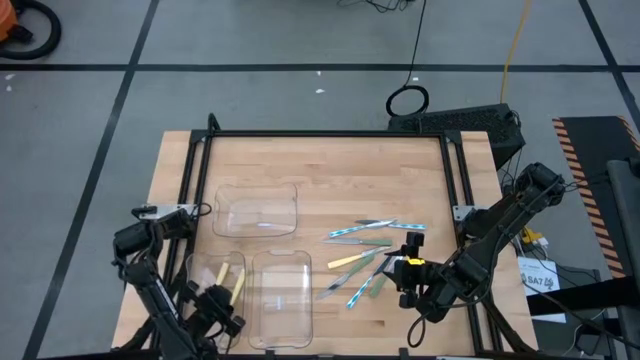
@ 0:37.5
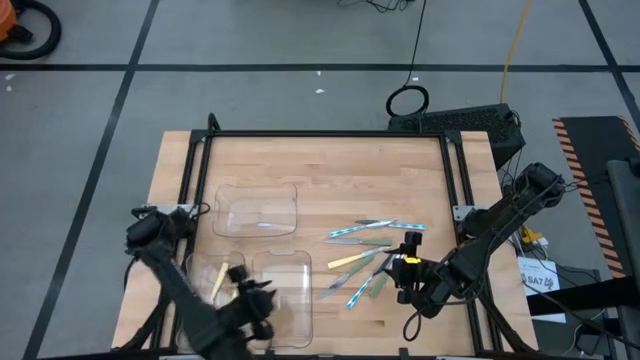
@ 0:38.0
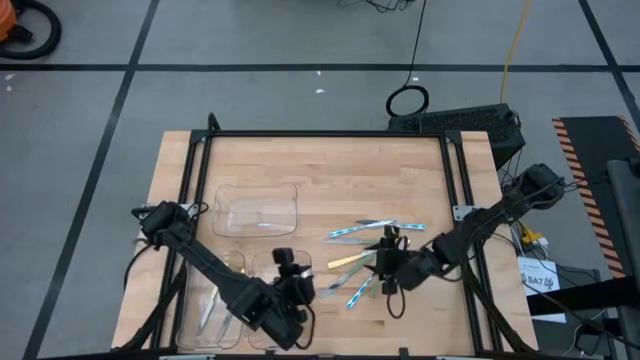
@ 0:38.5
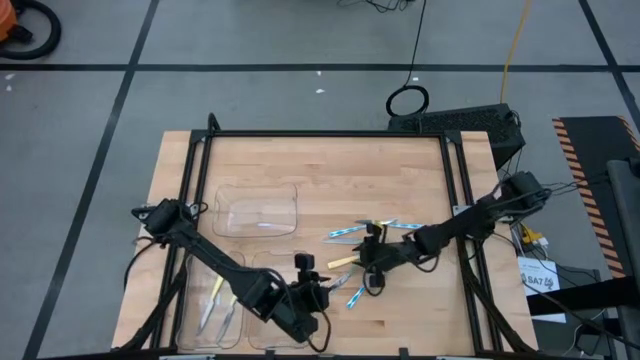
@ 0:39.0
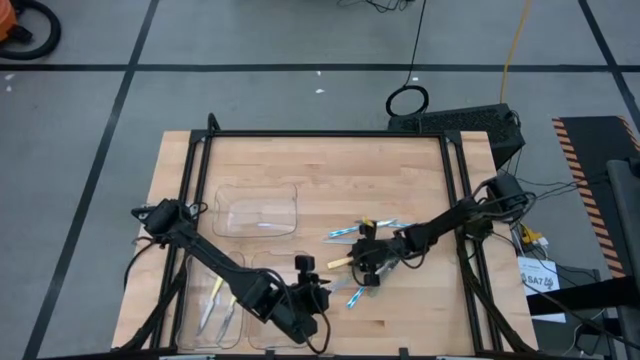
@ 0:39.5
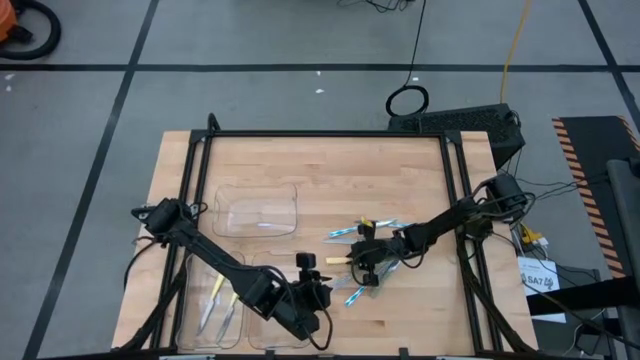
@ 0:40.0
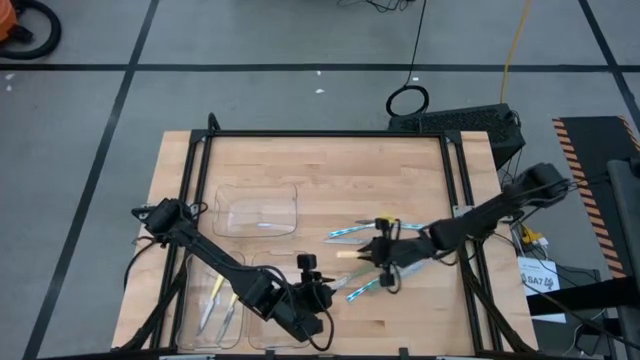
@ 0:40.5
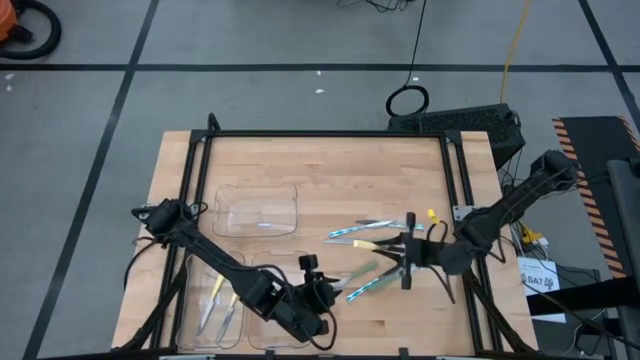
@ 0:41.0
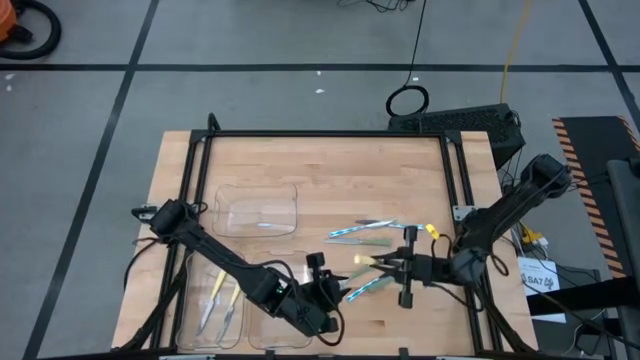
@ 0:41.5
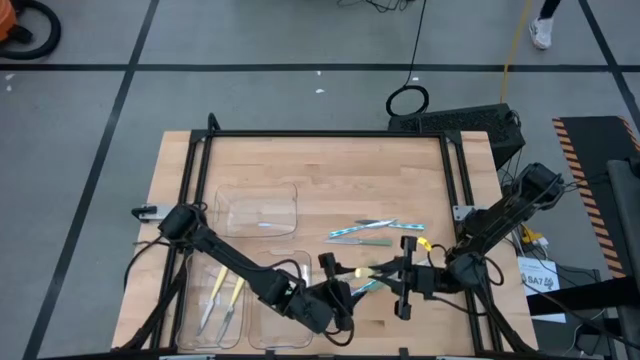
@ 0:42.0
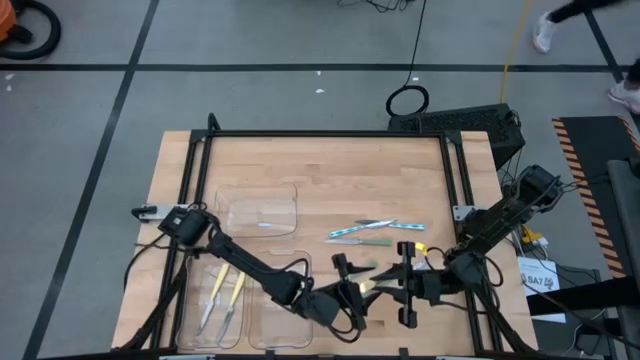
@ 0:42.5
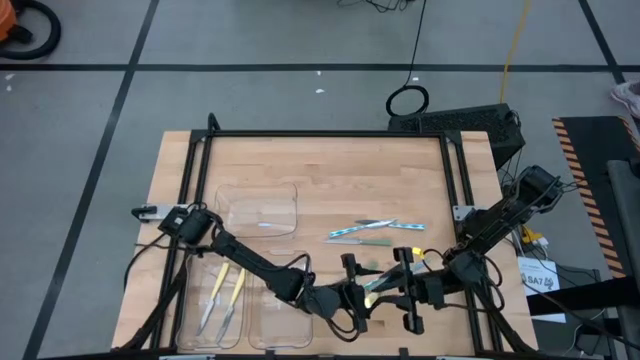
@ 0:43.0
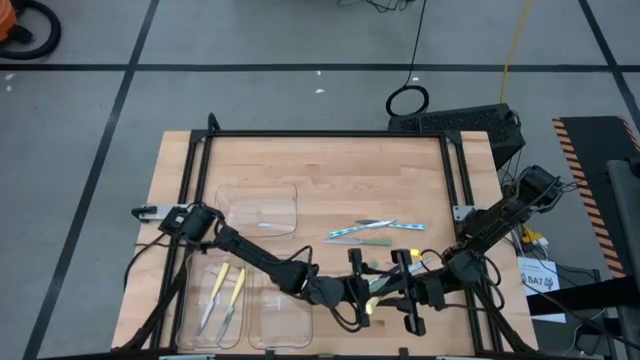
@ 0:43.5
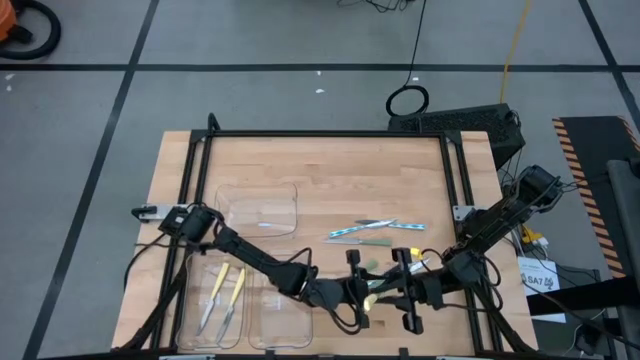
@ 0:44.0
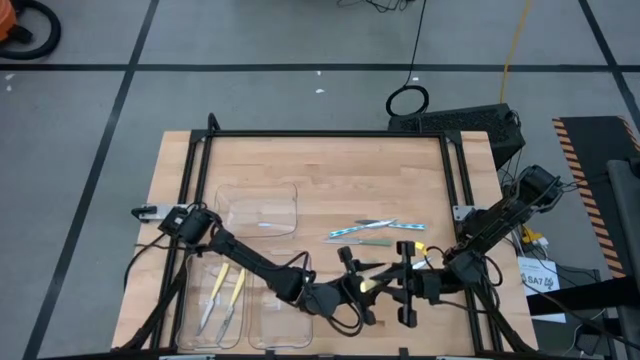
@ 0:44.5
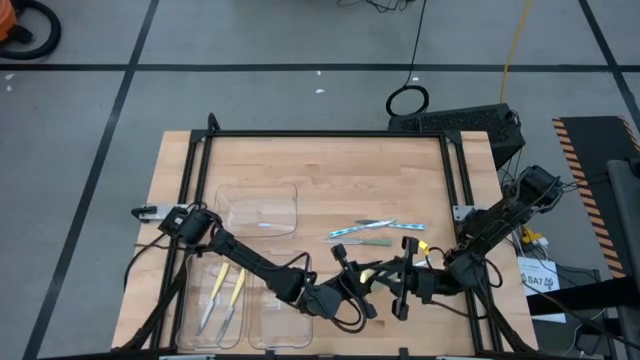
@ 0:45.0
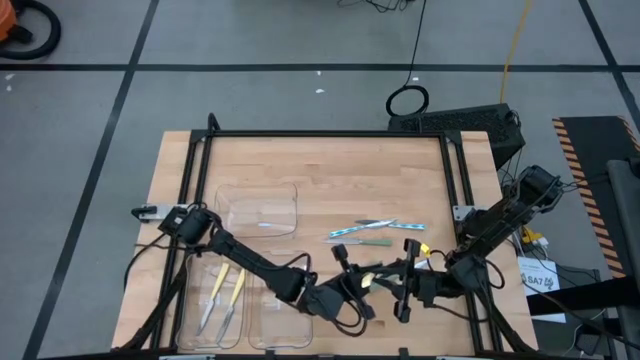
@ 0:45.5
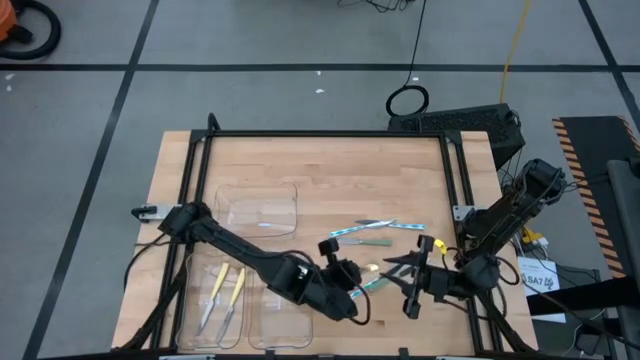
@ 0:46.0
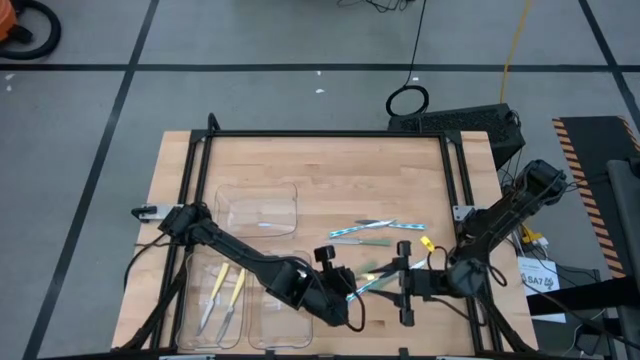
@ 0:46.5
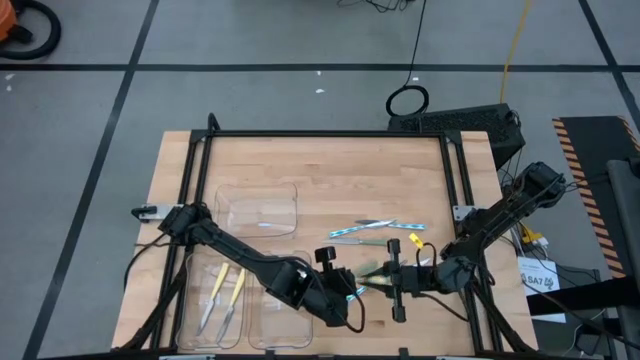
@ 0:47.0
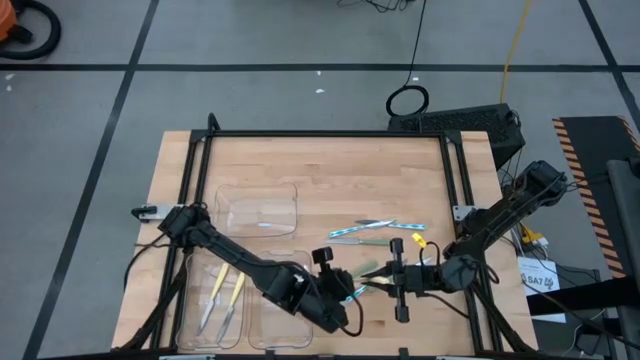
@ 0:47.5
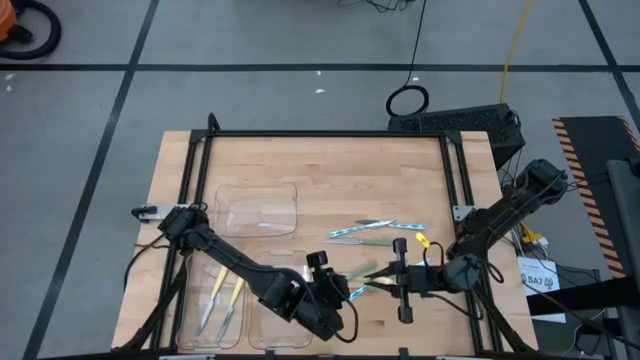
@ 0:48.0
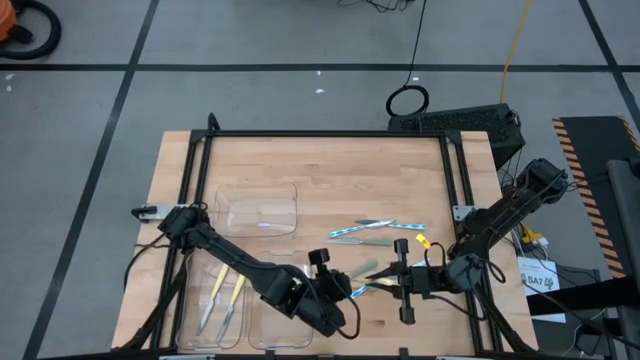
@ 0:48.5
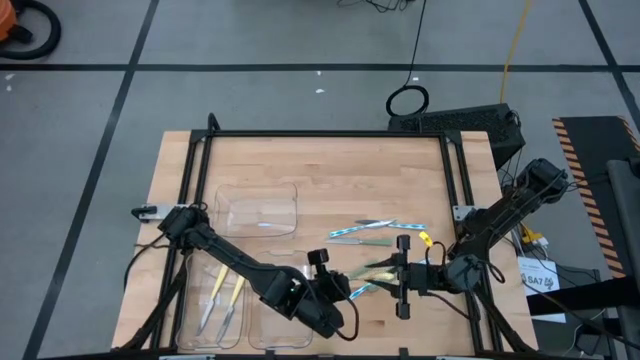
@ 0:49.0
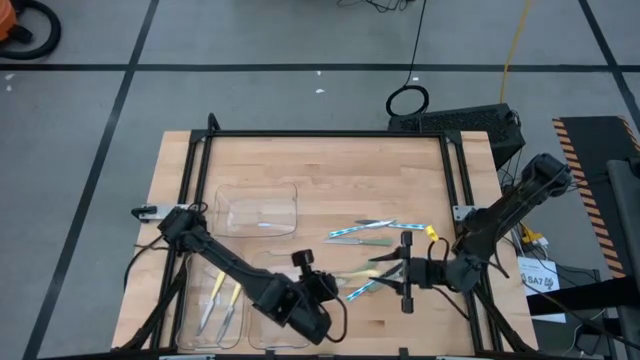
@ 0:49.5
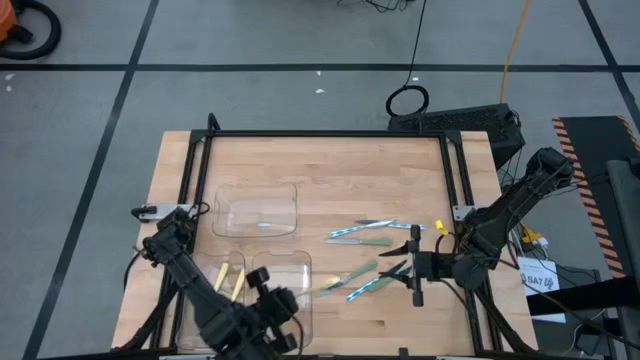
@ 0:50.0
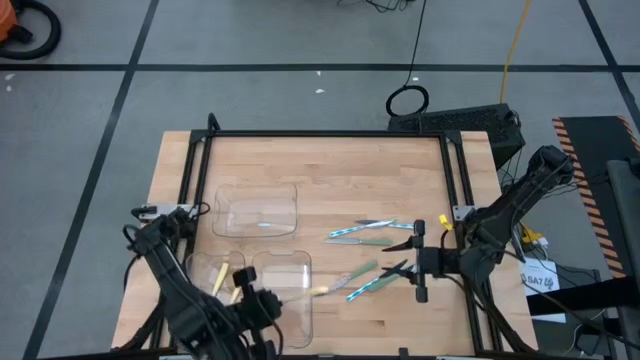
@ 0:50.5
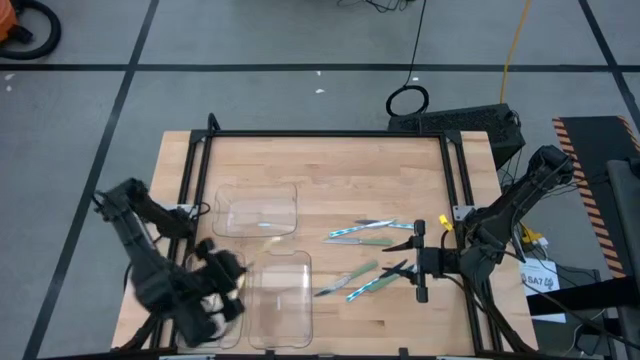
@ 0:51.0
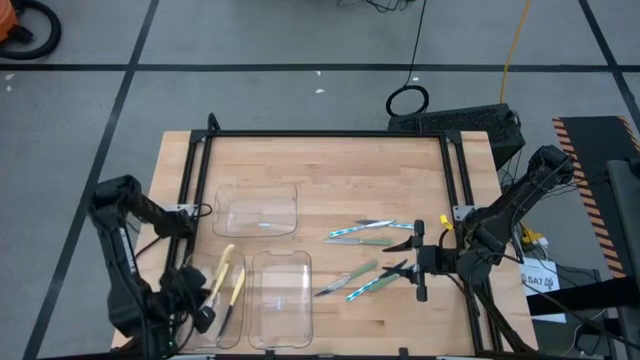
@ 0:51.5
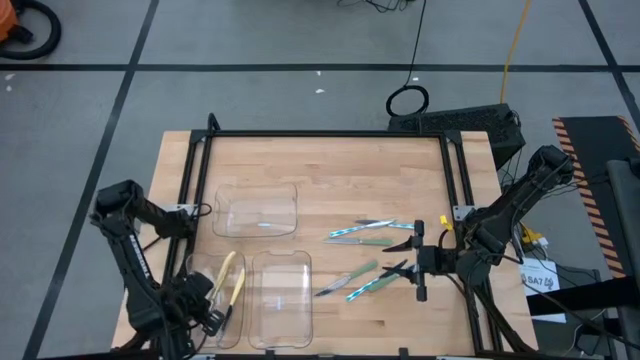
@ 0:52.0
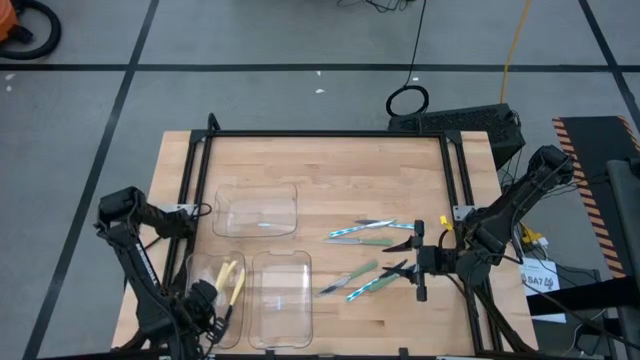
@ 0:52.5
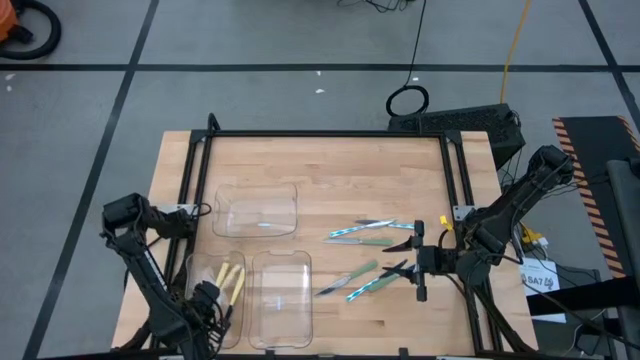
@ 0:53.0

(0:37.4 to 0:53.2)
Task: Sort silverware by color (type)
Put the yellow table knife into the bottom left transparent bin

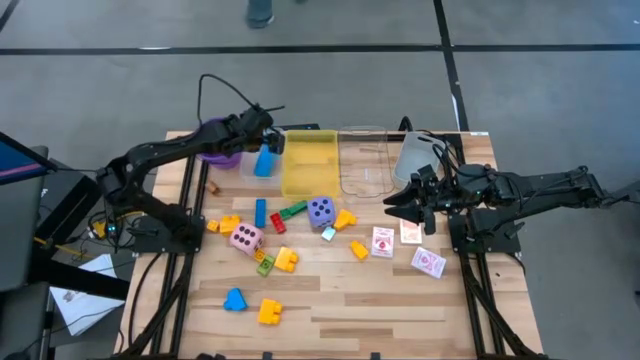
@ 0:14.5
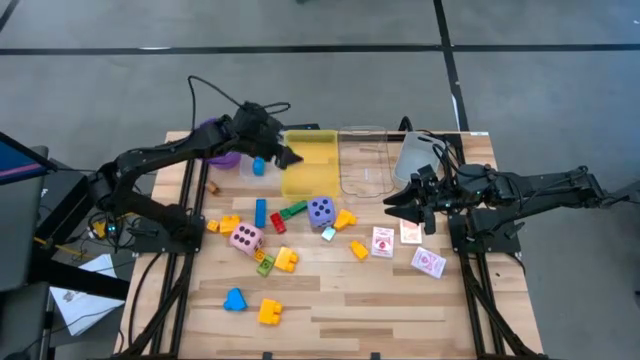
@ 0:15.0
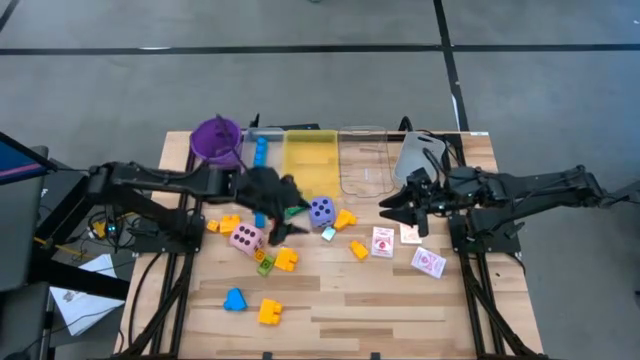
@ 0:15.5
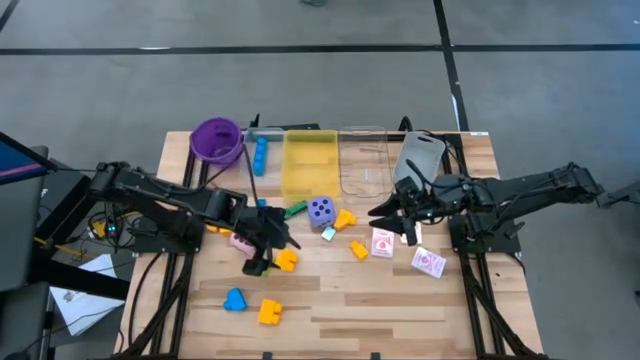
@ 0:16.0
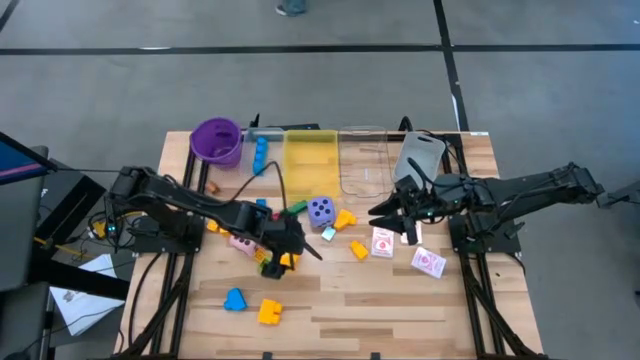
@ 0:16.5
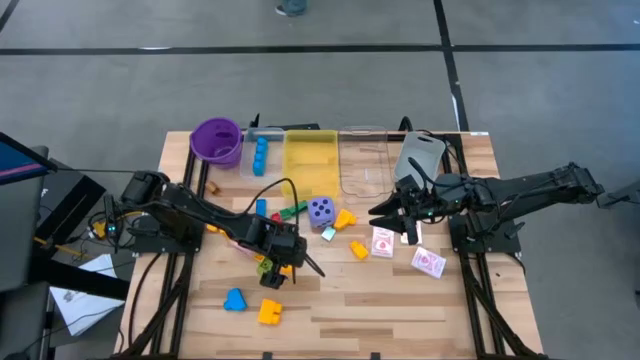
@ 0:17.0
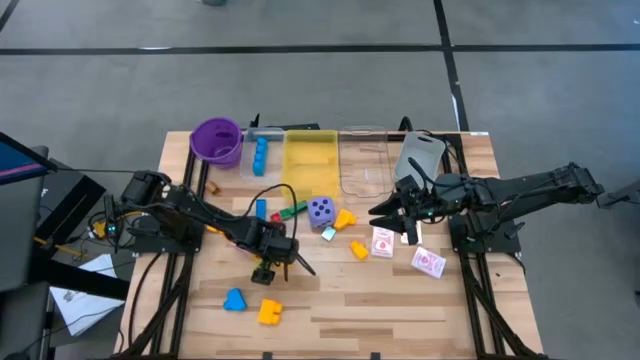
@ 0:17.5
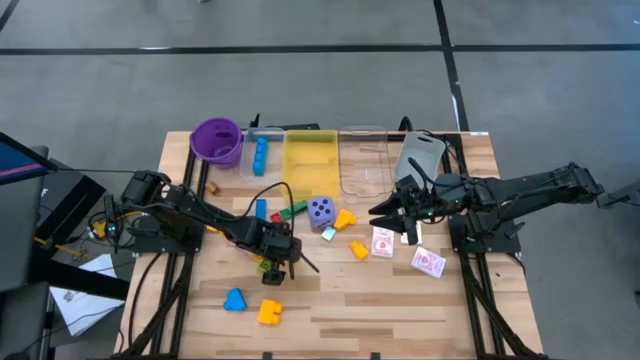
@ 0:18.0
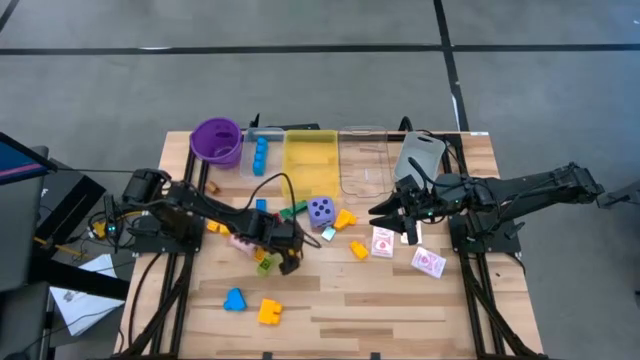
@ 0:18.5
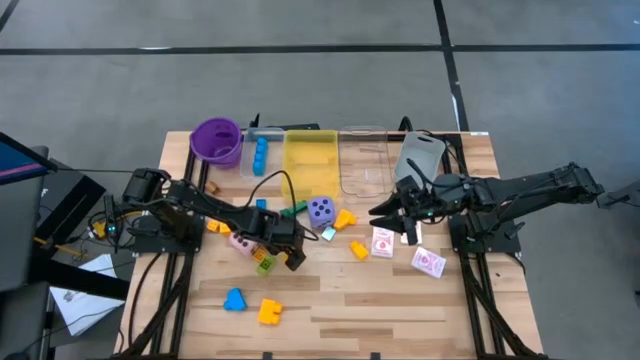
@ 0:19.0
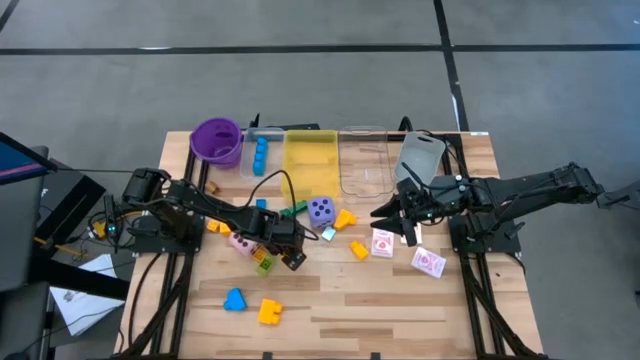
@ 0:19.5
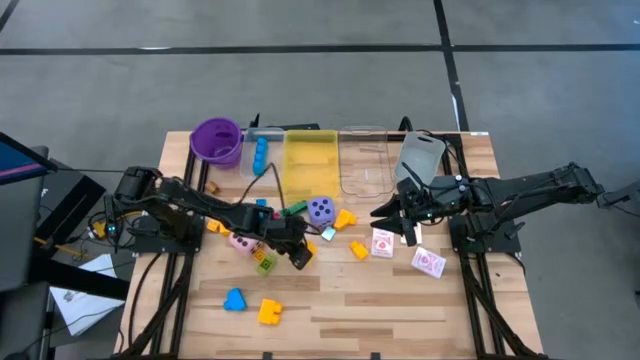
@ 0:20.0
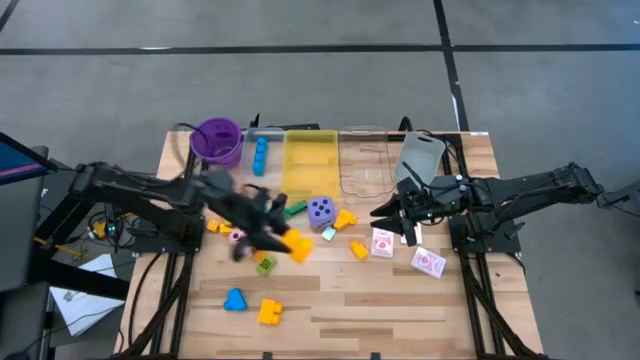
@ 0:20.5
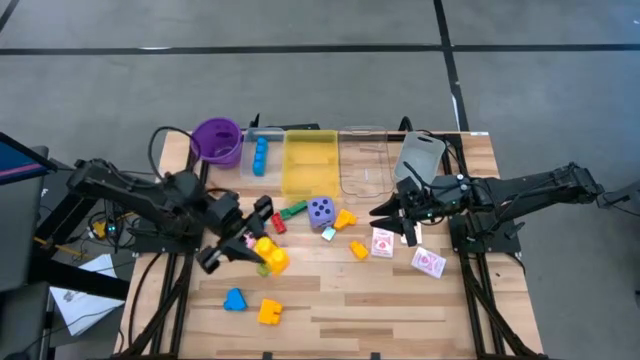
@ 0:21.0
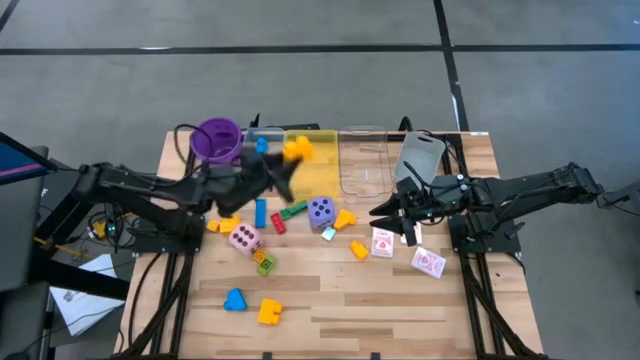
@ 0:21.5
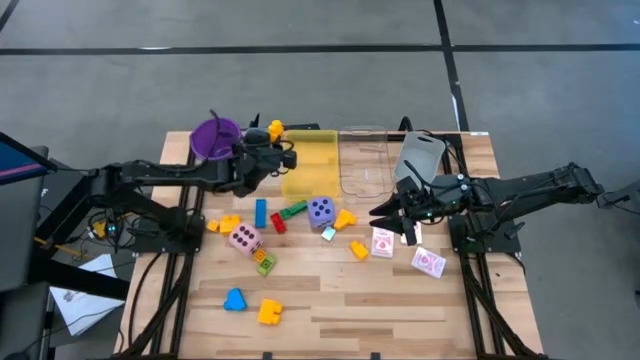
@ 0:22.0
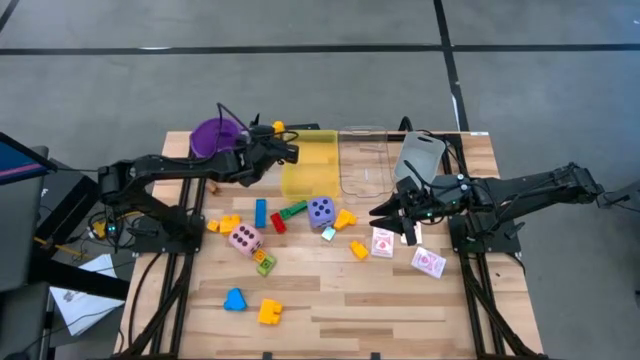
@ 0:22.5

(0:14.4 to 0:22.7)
Task: Pick & Place Toys
Put the yellow stud game piece into the left transparent bin
